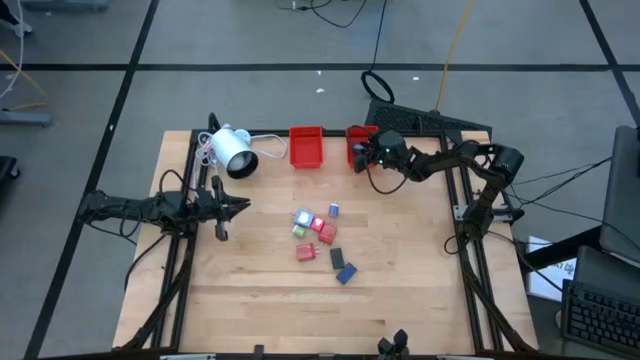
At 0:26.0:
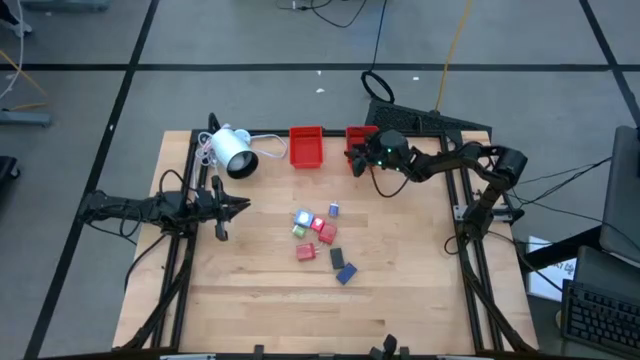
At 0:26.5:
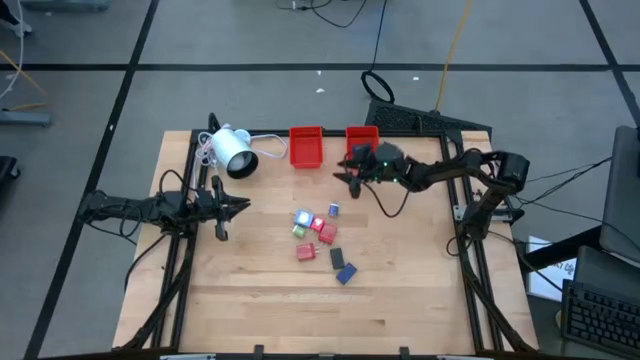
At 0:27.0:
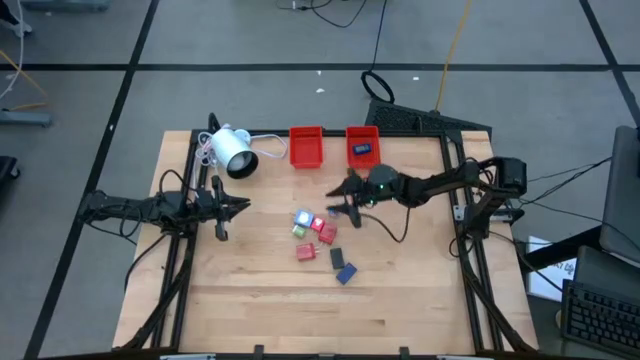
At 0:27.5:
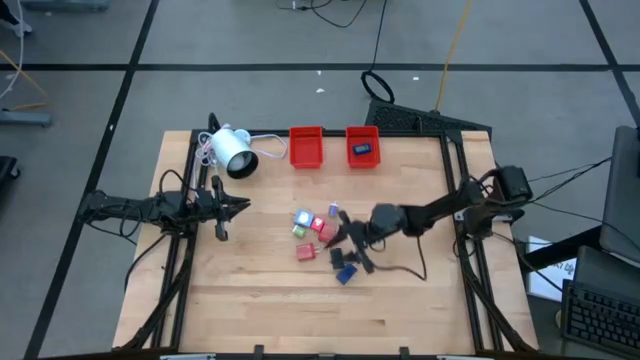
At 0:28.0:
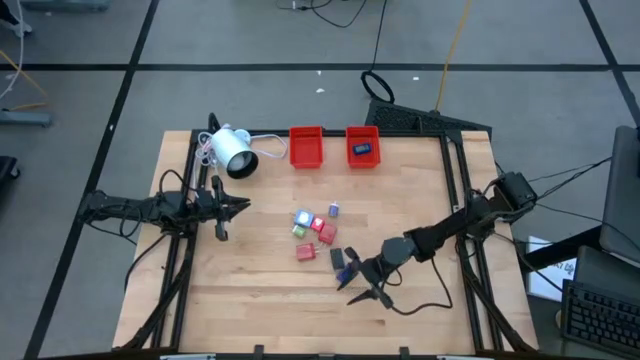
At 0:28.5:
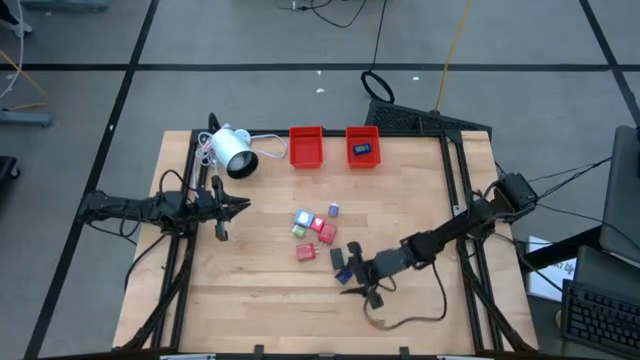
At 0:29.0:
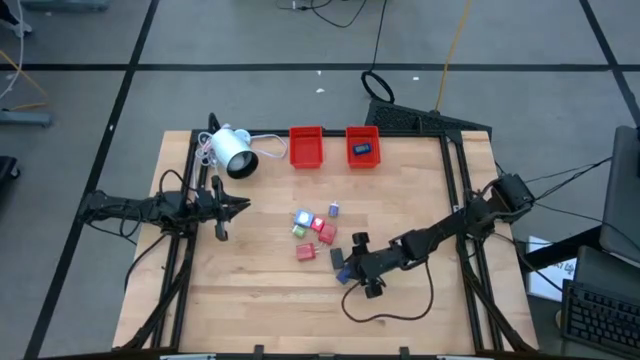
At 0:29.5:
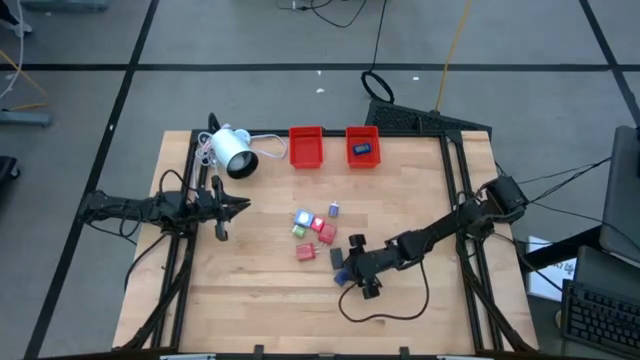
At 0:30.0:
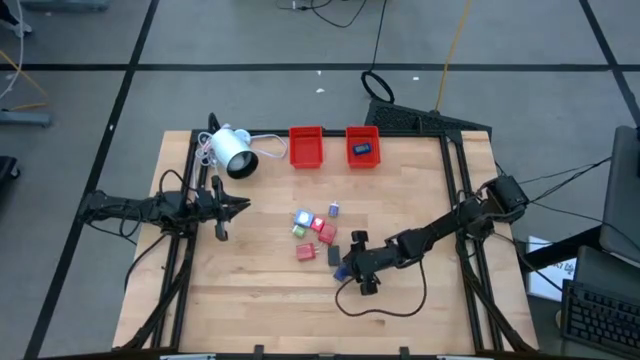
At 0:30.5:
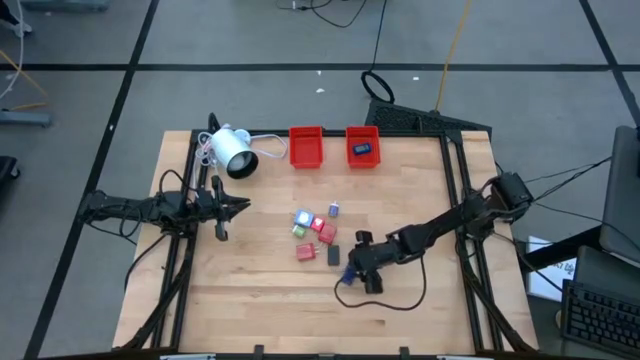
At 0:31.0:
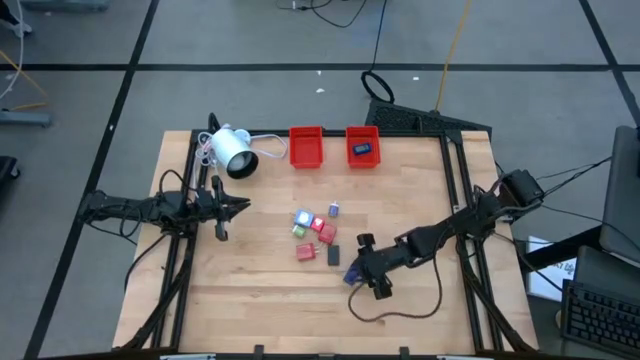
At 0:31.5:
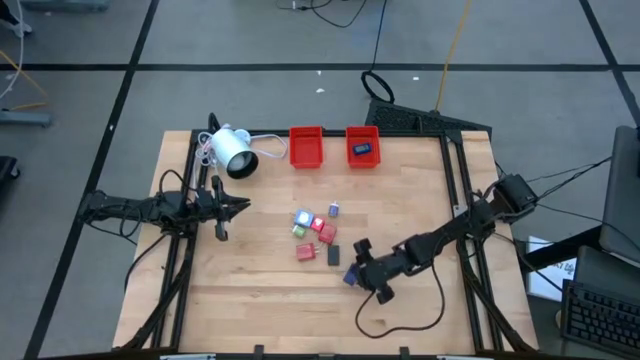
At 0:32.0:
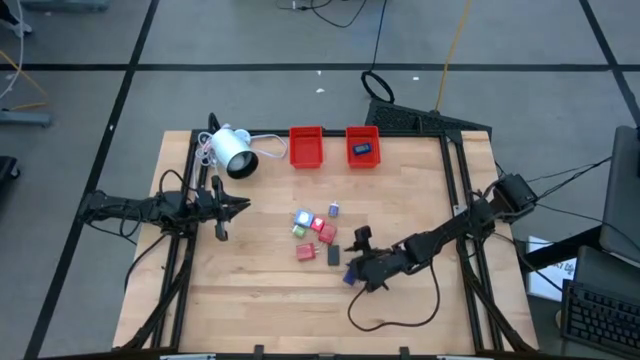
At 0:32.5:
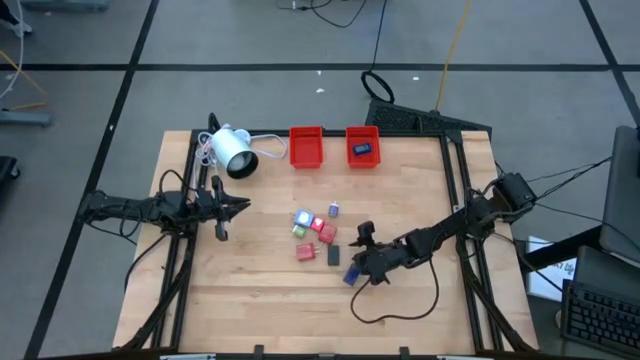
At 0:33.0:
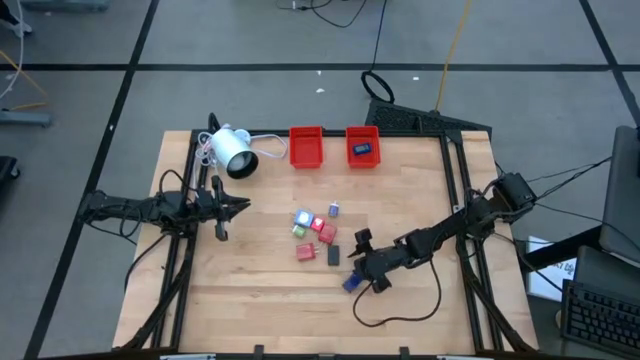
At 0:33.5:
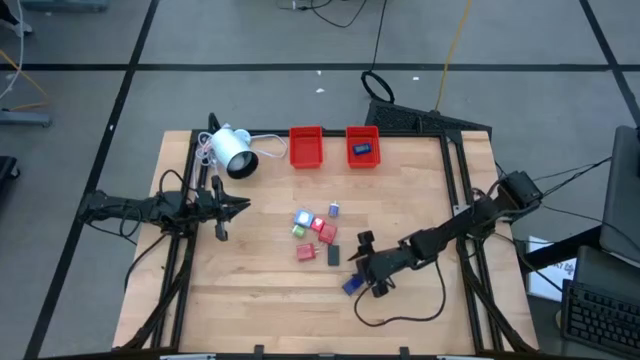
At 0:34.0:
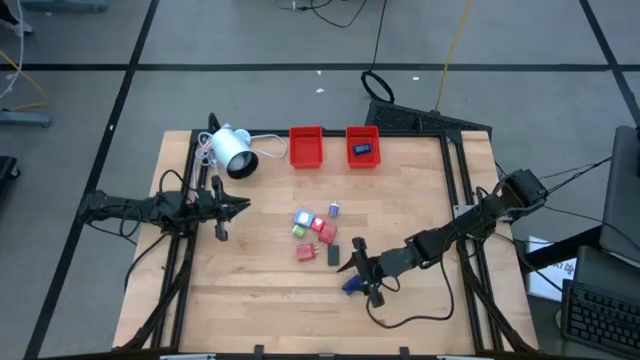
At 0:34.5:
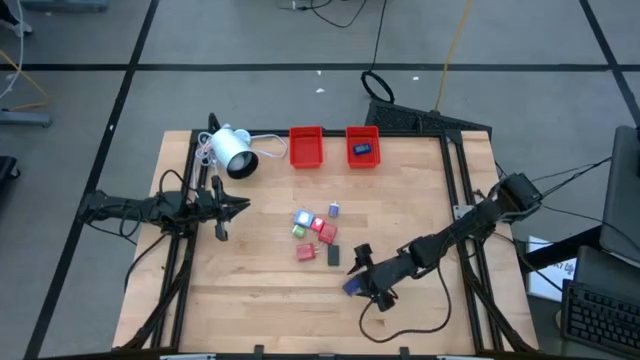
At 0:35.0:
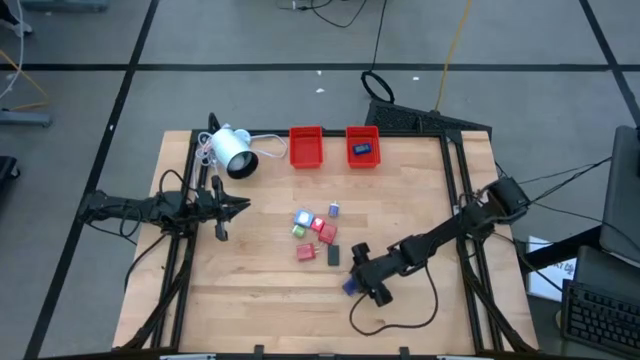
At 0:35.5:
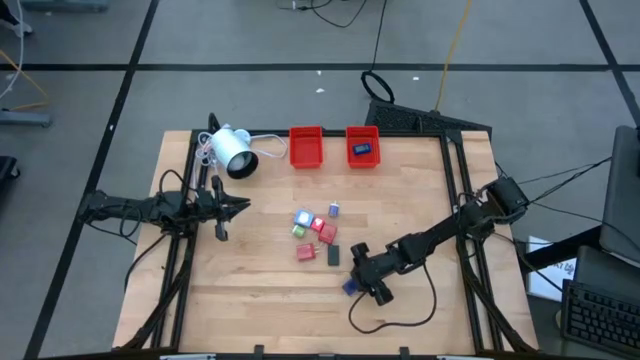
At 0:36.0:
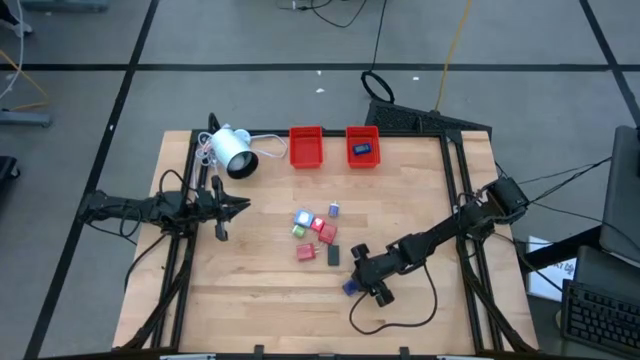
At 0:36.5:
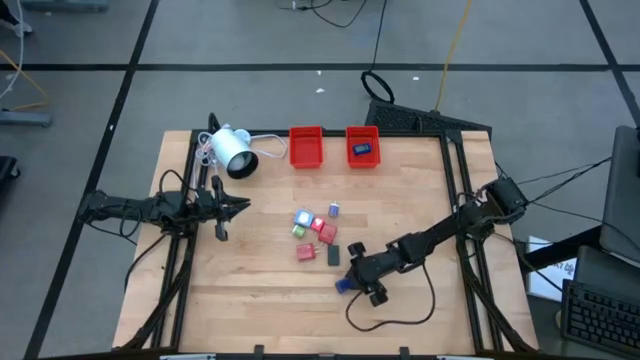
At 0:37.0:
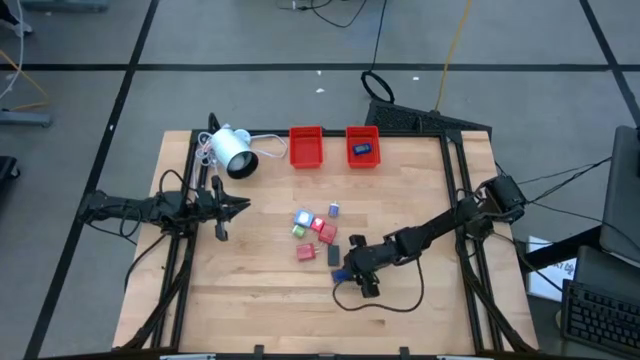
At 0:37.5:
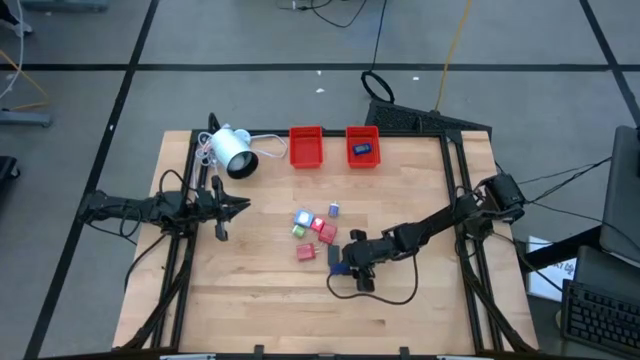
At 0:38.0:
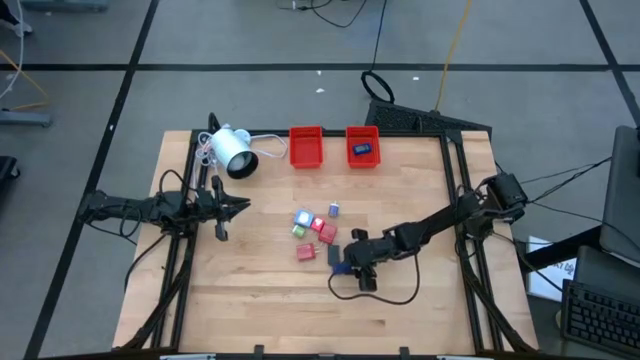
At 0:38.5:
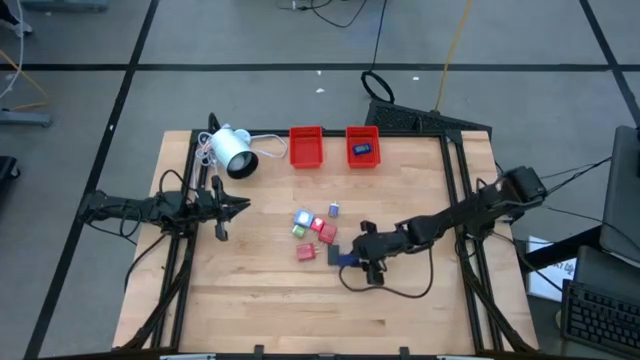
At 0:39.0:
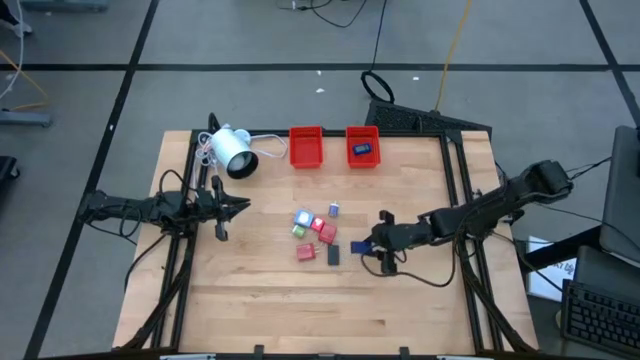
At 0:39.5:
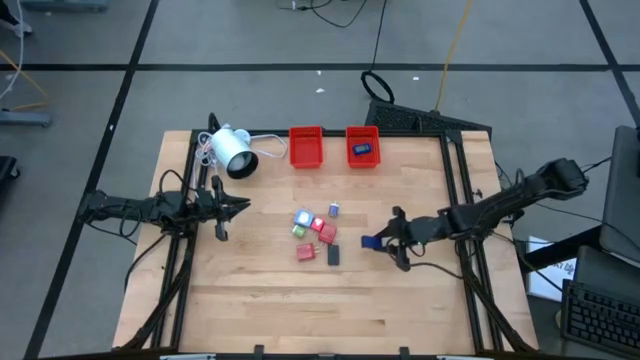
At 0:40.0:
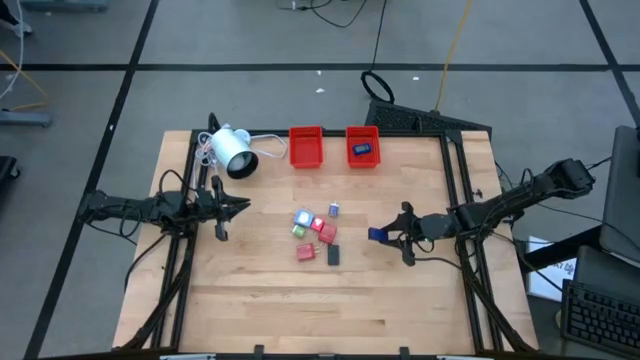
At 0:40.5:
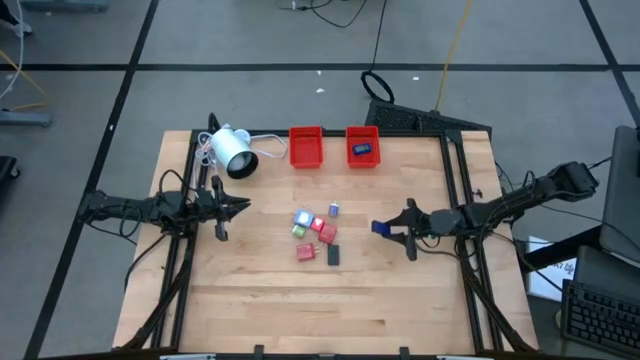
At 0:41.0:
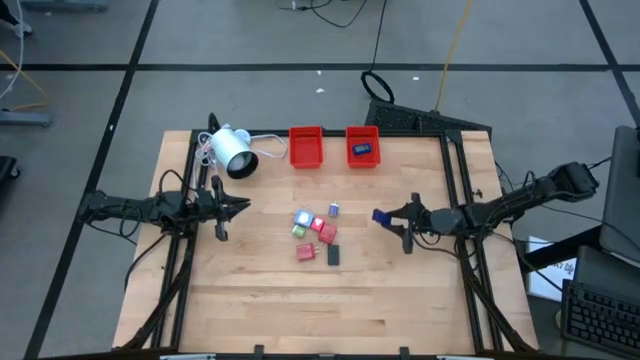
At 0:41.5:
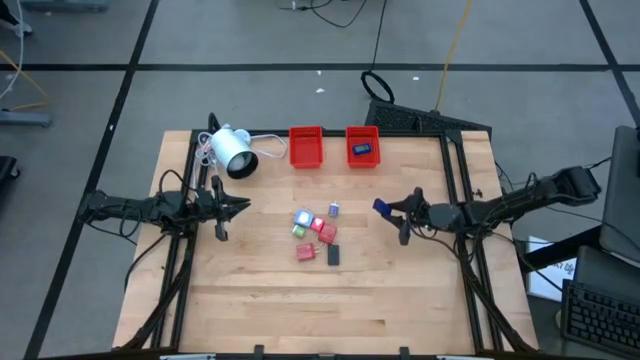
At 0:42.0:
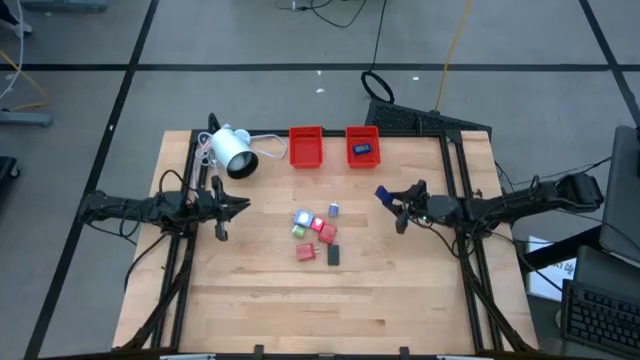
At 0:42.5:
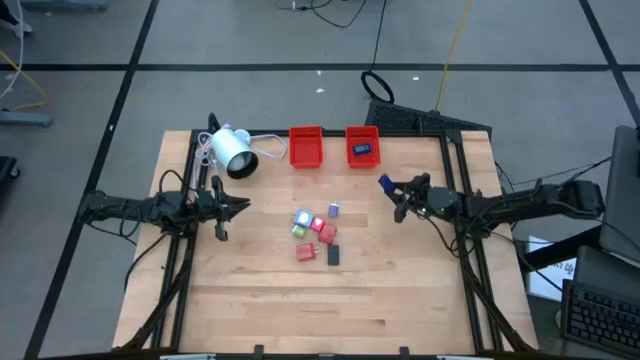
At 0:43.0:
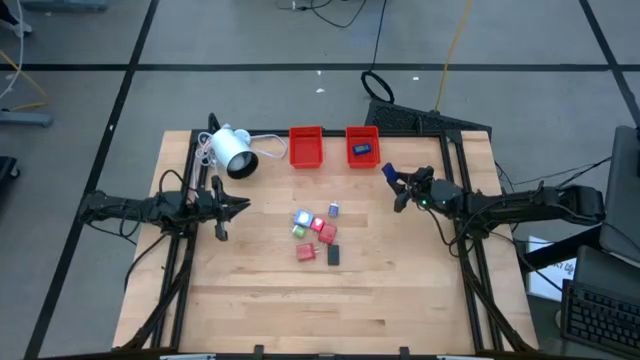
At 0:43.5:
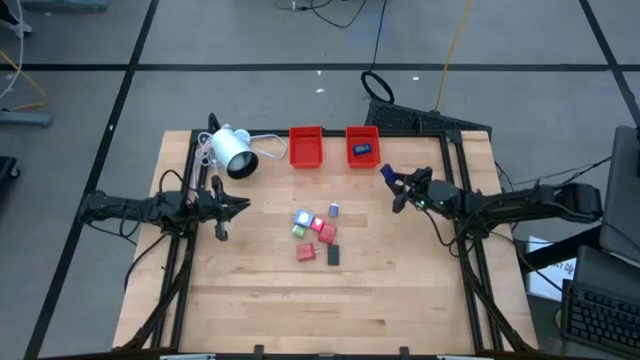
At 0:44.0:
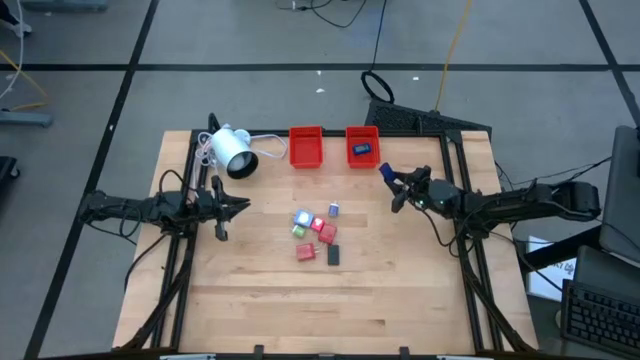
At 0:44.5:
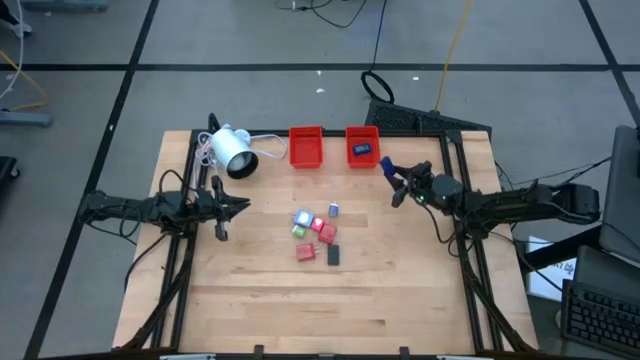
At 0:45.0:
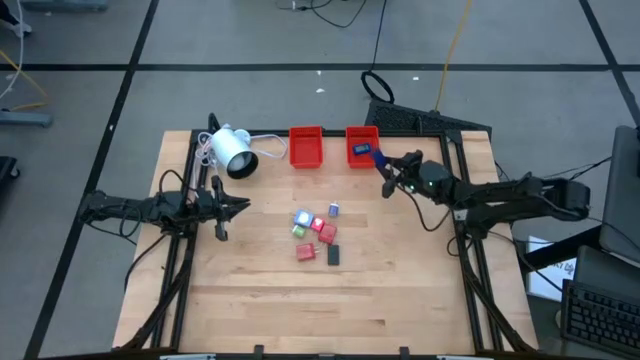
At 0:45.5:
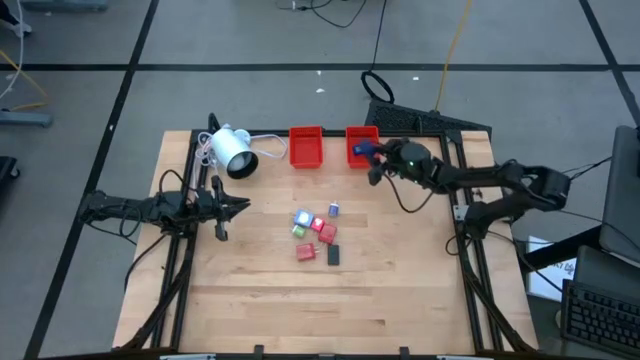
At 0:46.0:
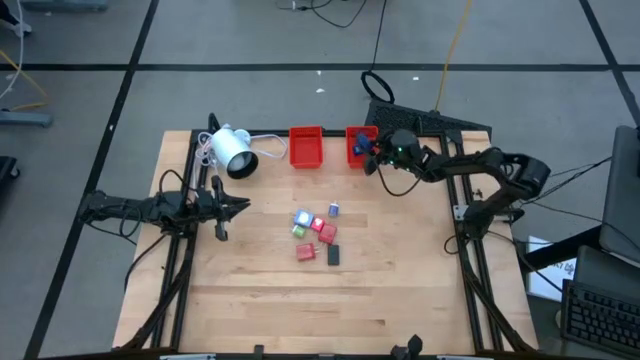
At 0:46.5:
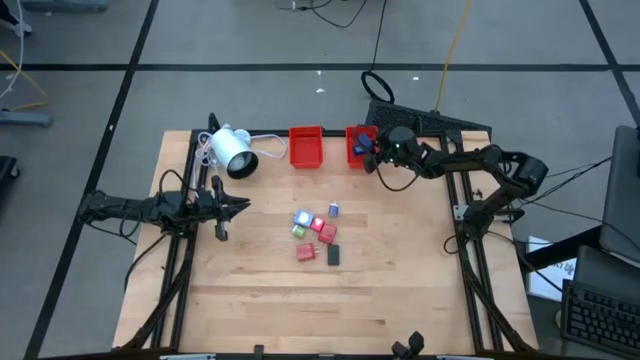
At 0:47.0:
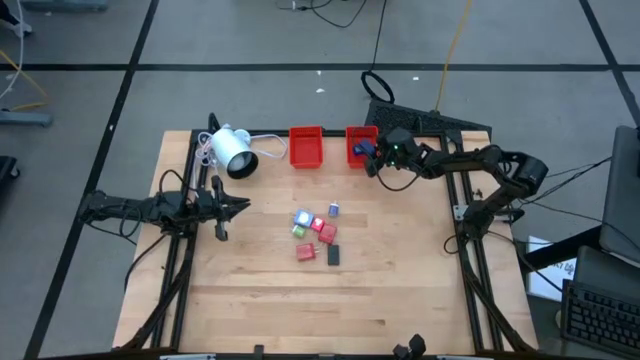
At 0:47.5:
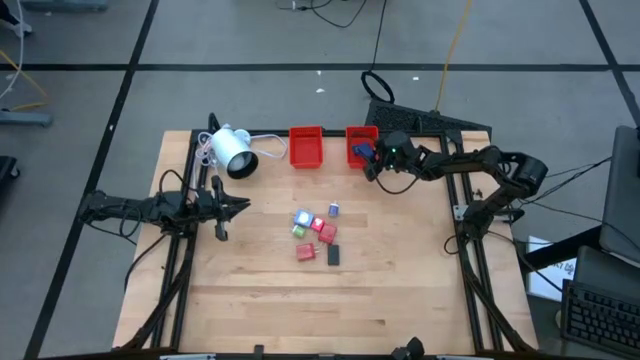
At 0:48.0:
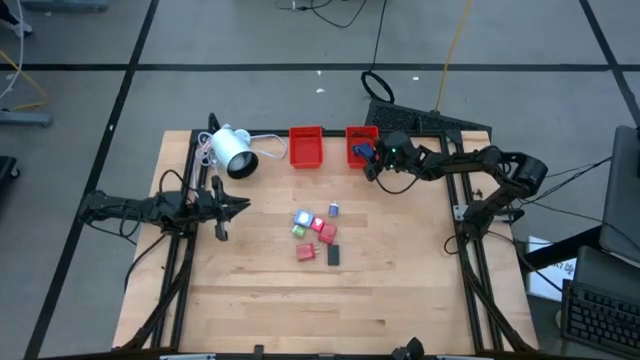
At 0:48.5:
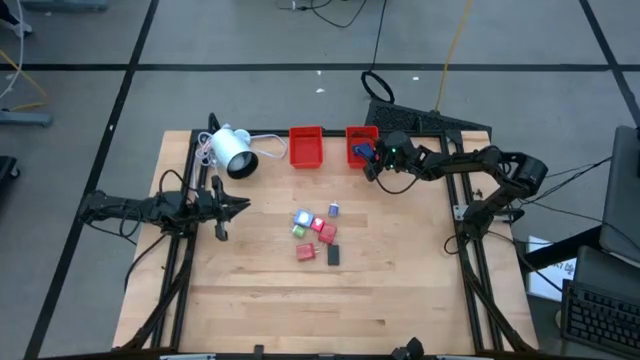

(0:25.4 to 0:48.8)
Task: Pick & Place Office items
Put the blue digital clock into the right red bin
